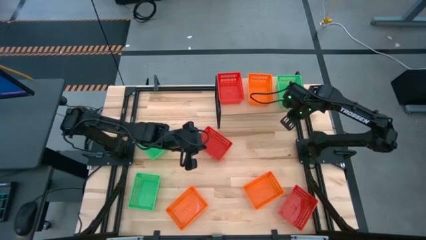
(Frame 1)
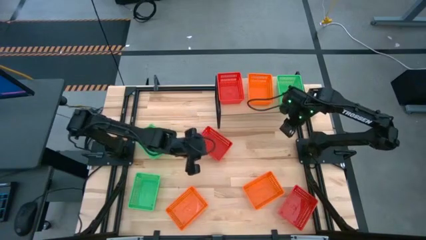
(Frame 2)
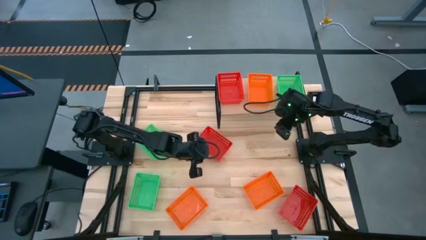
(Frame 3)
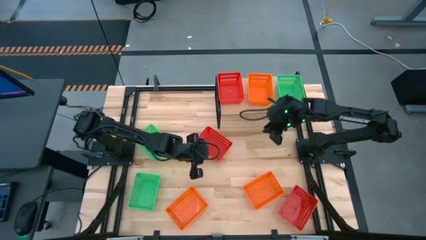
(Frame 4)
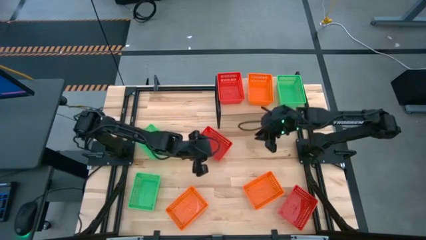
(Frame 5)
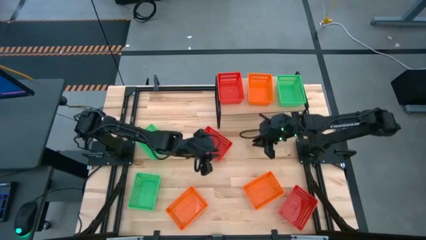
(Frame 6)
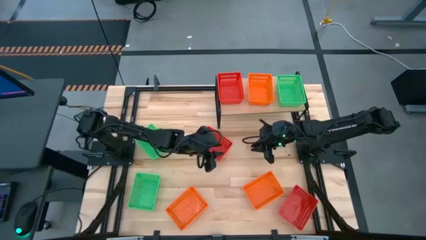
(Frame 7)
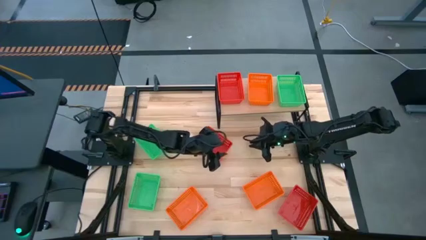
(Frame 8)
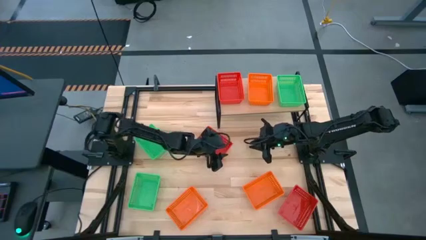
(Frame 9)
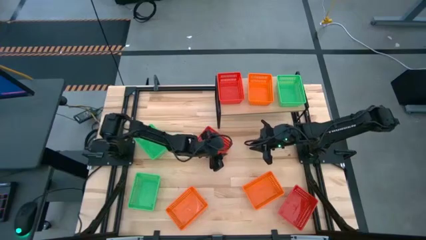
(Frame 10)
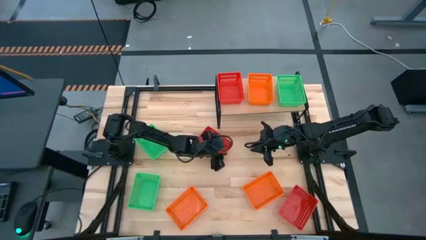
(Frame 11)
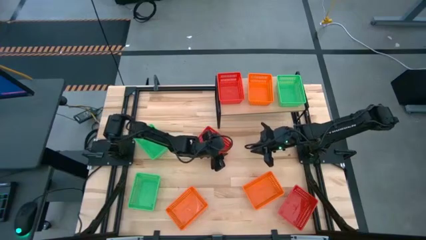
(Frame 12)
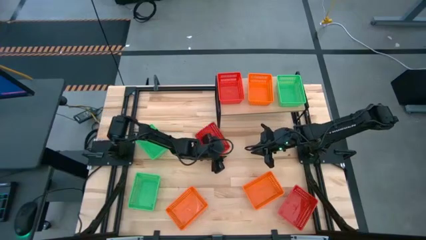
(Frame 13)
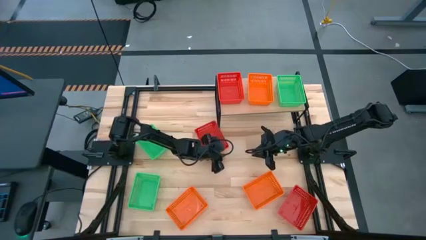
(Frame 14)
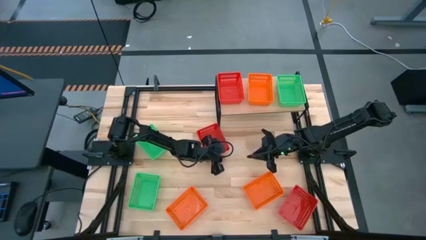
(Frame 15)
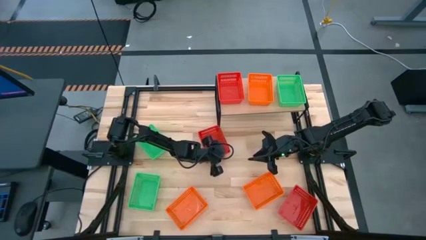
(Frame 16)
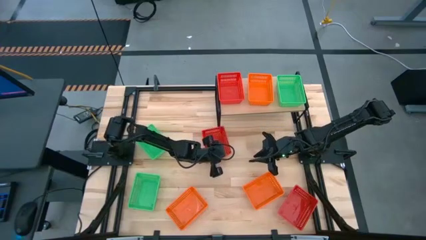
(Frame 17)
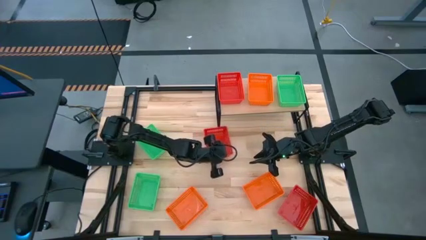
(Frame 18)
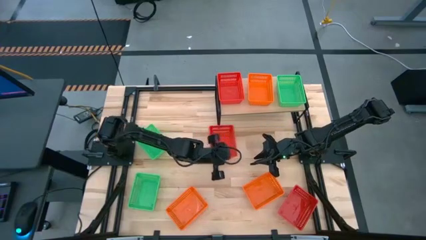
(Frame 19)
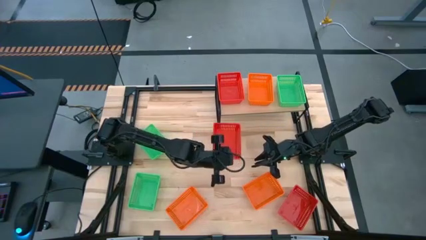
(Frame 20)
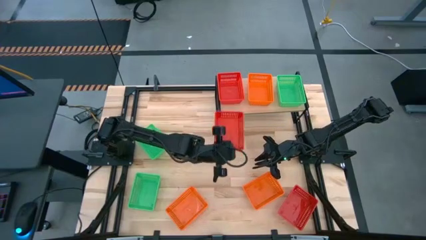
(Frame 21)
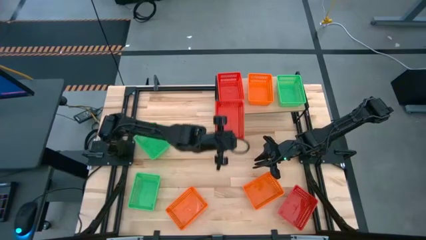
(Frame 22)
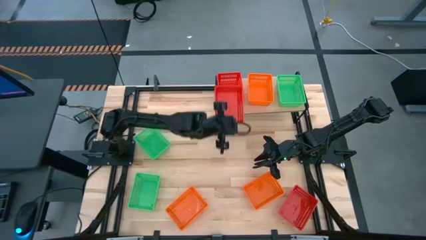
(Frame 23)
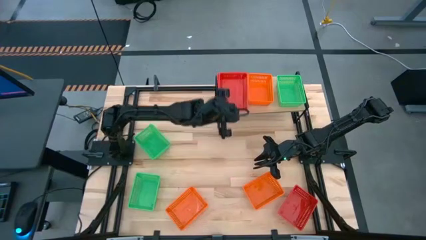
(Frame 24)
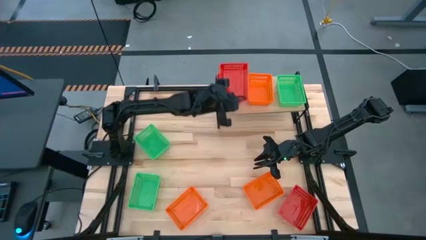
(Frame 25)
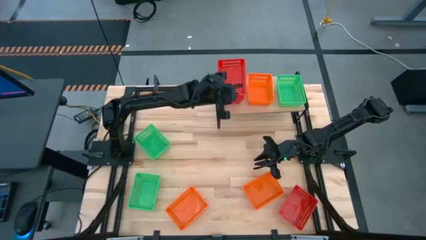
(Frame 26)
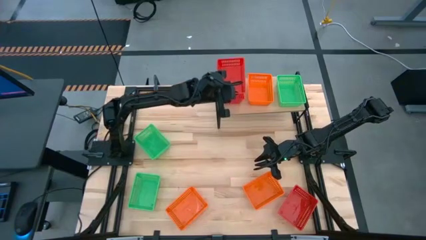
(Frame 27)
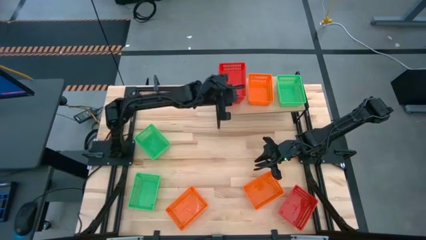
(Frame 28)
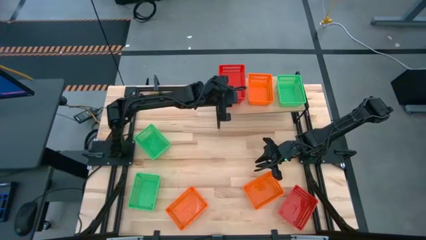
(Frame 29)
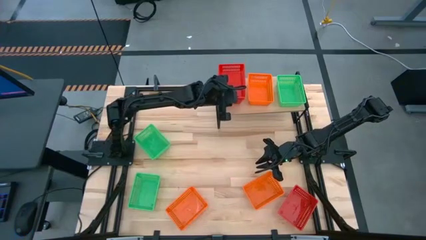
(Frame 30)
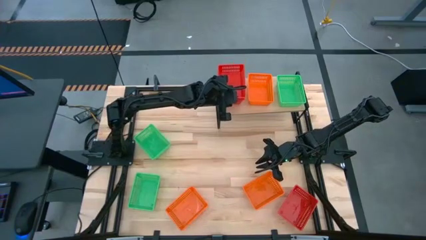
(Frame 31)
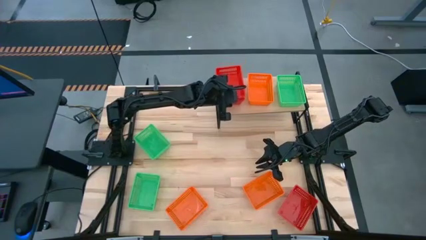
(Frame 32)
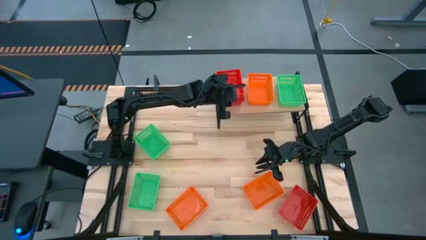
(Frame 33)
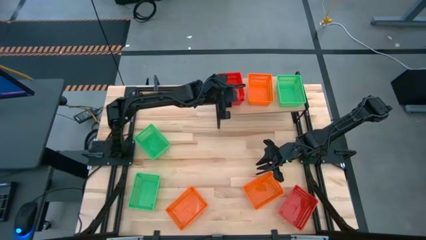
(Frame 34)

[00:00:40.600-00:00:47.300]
Task: Stack baskets on shelf by color
Stack the top red bin on top of the red bin on the shelf

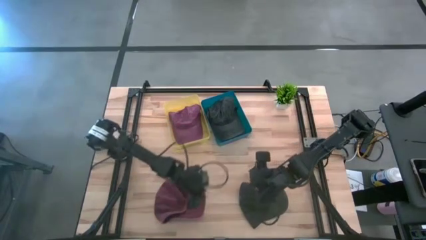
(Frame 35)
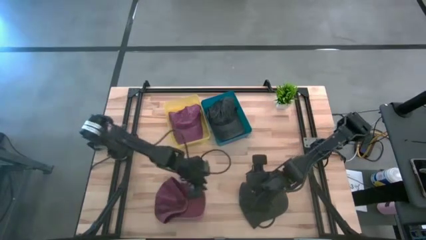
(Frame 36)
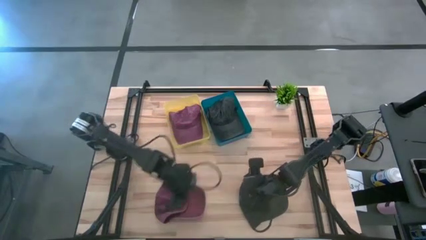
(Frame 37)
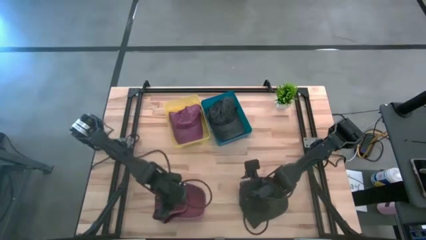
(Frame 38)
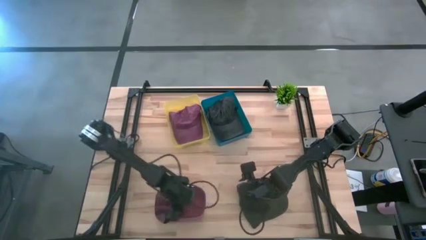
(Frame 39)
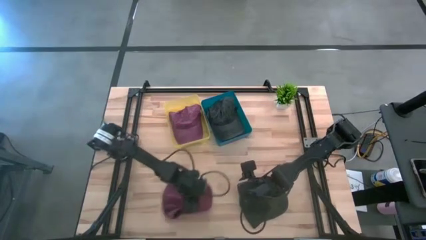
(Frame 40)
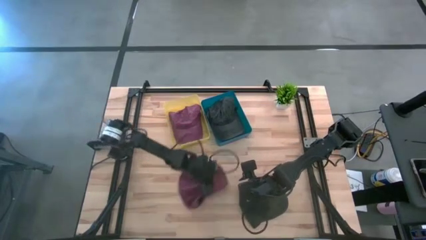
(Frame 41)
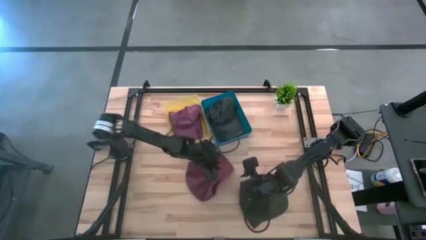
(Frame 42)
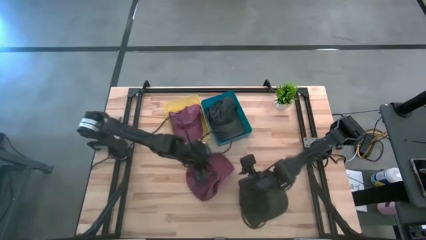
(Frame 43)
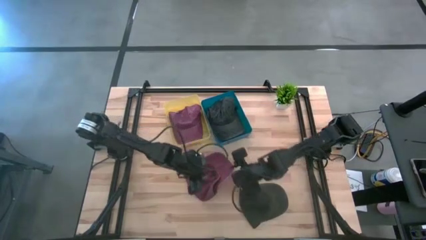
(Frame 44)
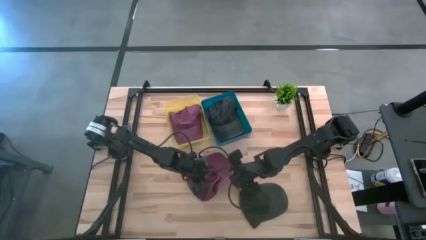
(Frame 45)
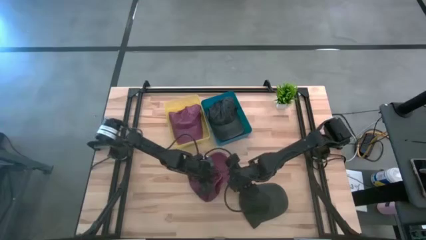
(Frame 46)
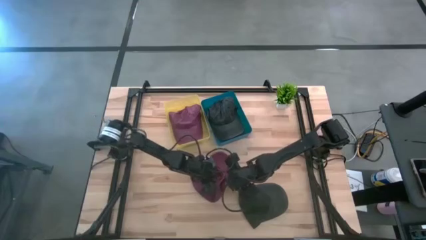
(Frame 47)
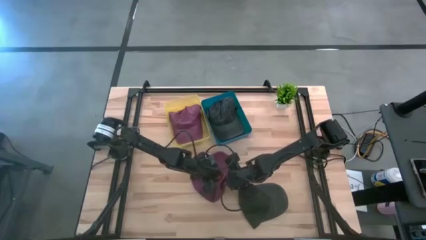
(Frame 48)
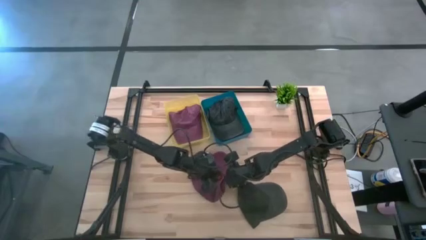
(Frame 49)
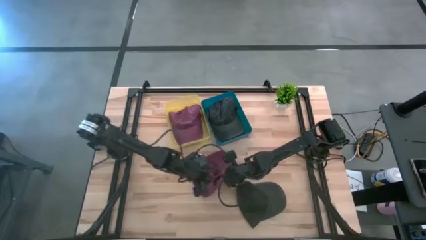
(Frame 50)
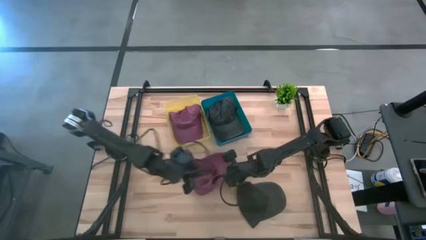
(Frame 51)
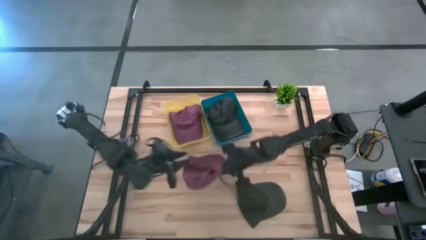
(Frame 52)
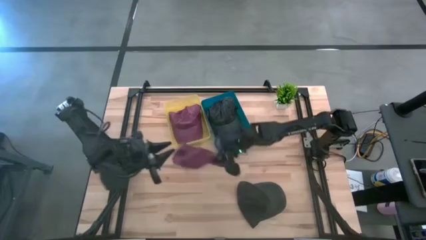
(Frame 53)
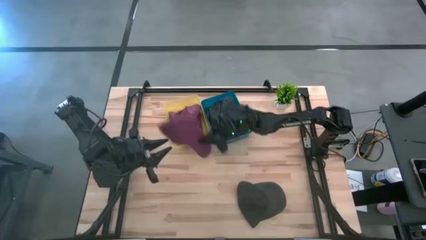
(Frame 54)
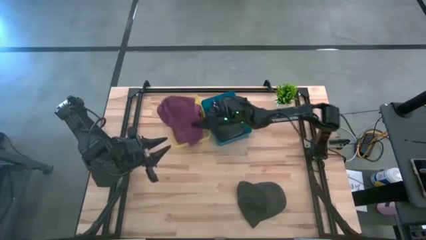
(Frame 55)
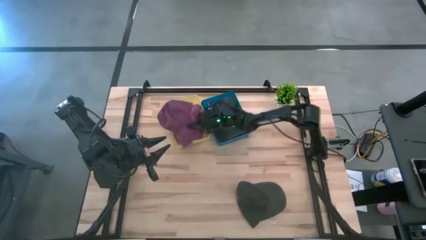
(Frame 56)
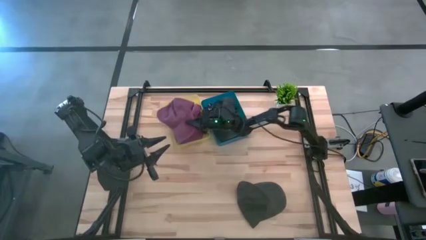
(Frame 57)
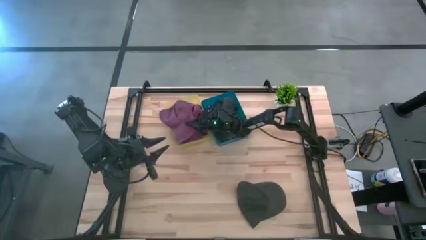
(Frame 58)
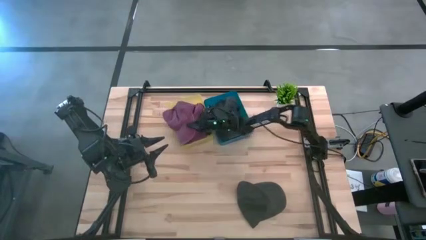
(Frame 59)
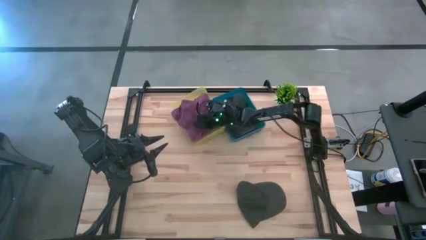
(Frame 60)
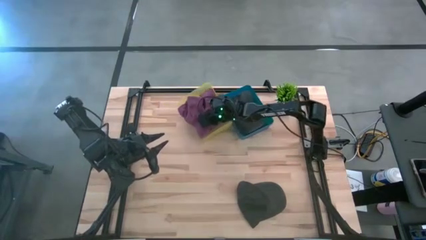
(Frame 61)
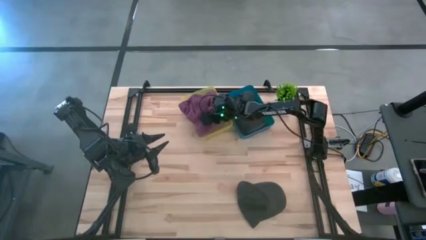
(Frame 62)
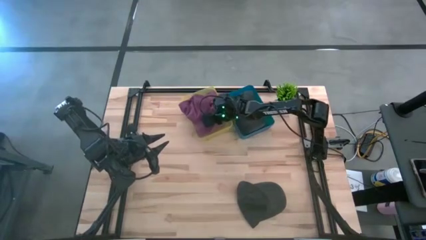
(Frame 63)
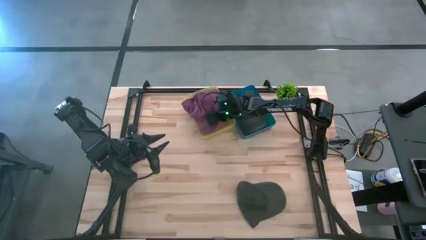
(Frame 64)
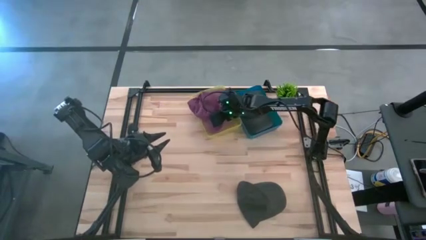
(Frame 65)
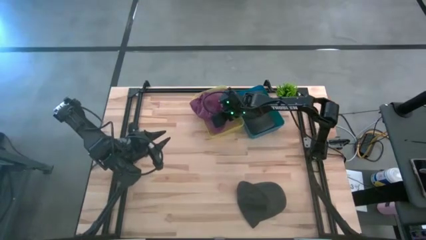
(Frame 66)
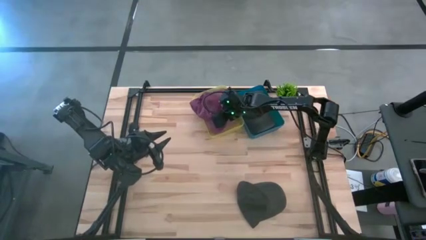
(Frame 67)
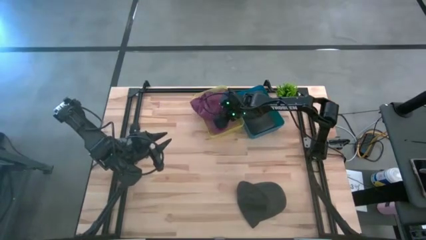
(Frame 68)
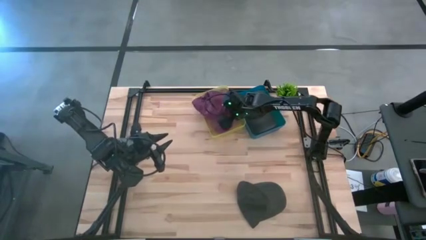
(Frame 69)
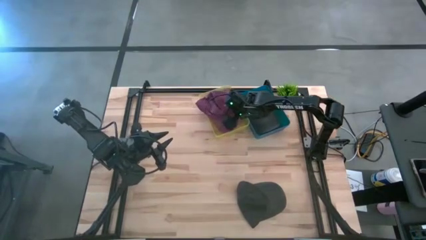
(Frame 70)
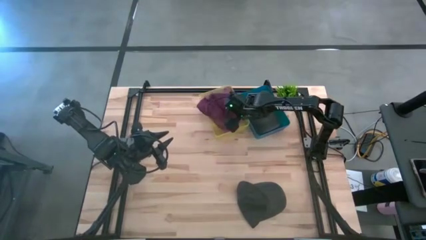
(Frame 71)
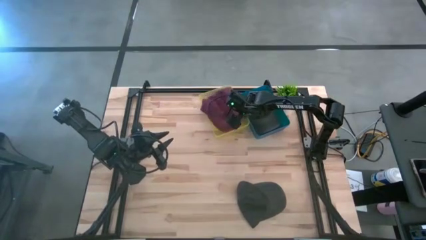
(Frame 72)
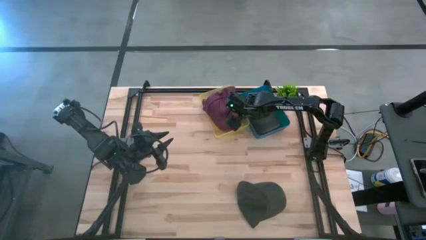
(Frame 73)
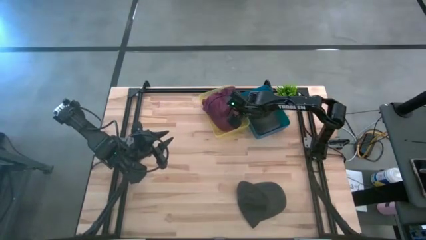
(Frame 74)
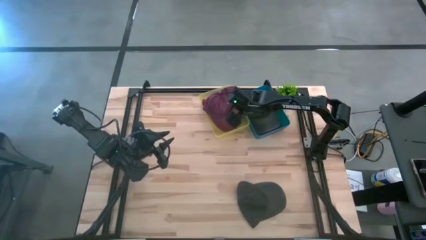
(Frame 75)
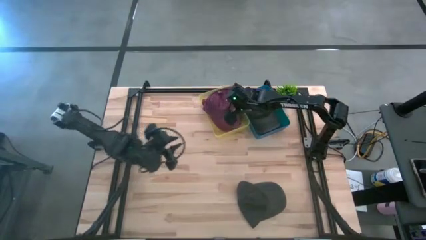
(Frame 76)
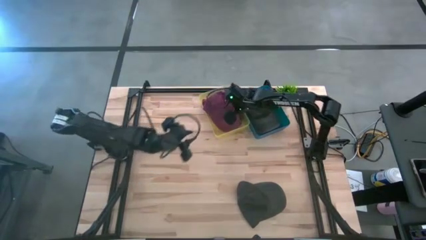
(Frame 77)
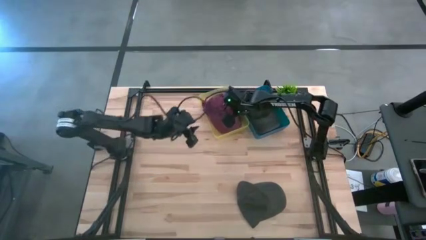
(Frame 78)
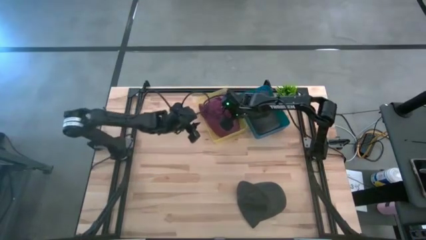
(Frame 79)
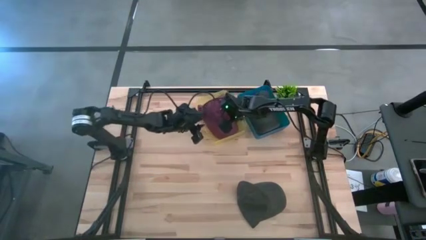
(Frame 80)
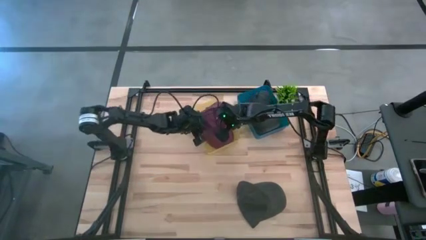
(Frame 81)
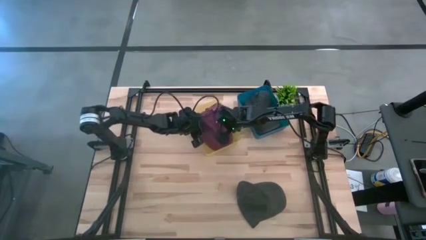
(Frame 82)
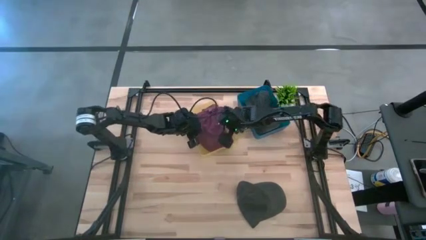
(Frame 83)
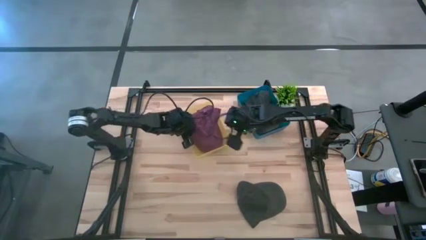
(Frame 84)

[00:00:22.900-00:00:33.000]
Task: Pick & Place hat
Put the red cap into the yellow bin
